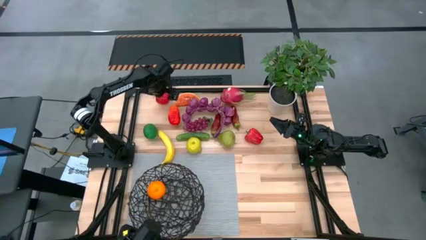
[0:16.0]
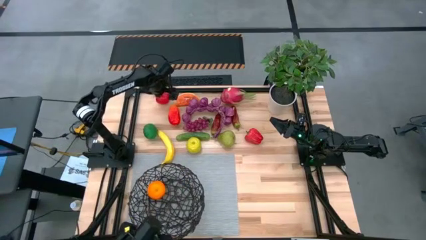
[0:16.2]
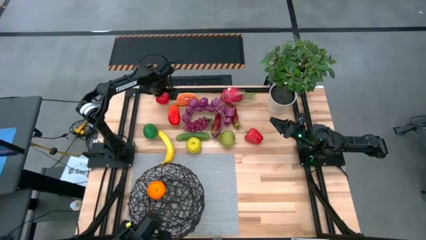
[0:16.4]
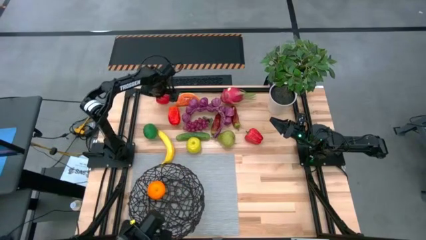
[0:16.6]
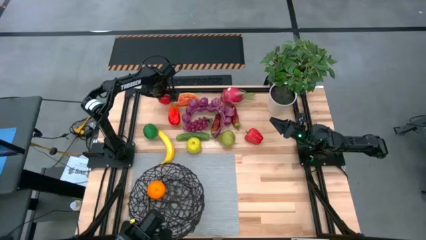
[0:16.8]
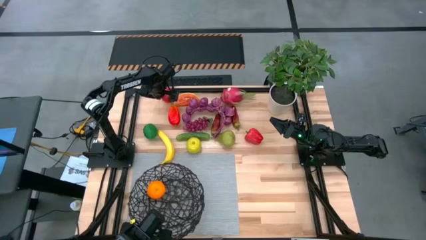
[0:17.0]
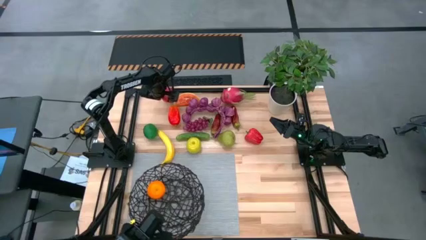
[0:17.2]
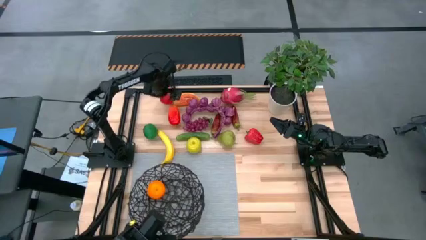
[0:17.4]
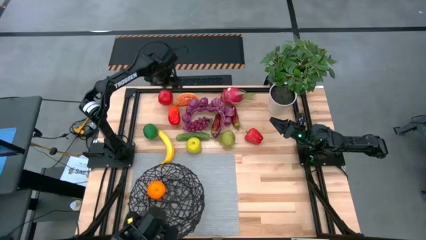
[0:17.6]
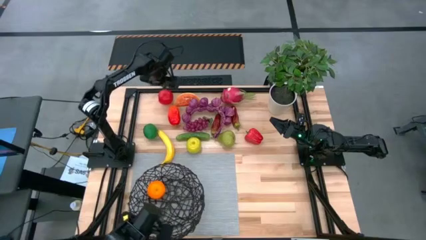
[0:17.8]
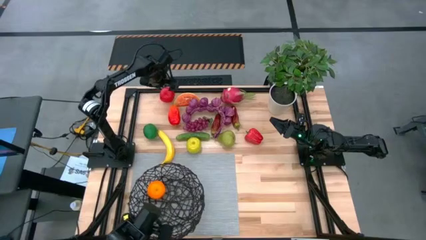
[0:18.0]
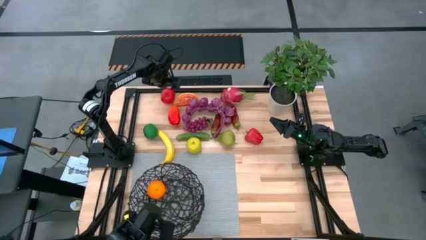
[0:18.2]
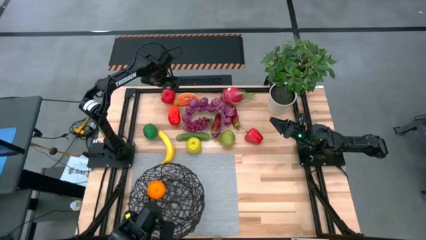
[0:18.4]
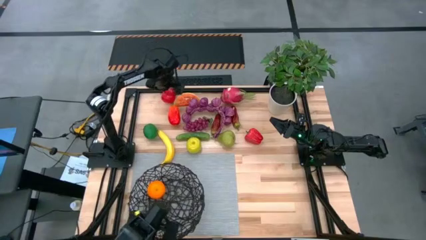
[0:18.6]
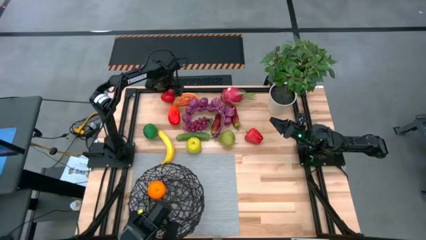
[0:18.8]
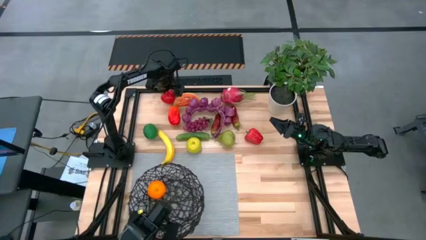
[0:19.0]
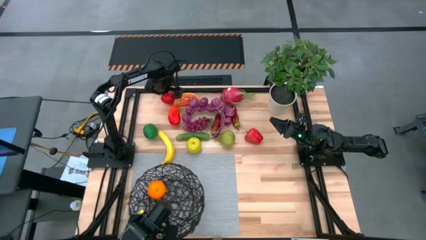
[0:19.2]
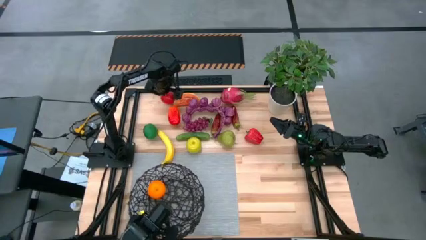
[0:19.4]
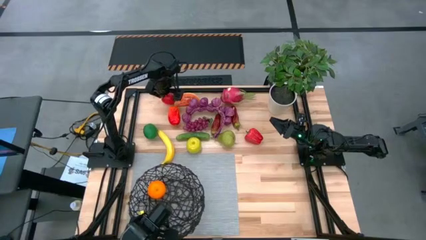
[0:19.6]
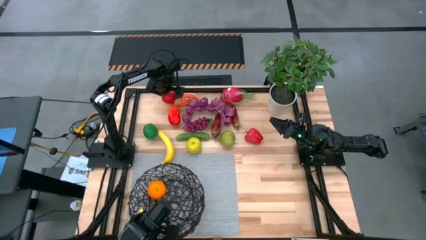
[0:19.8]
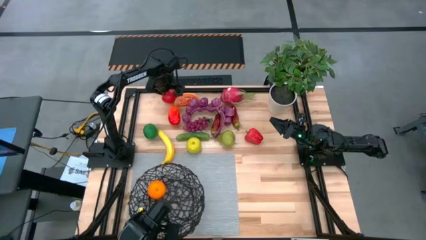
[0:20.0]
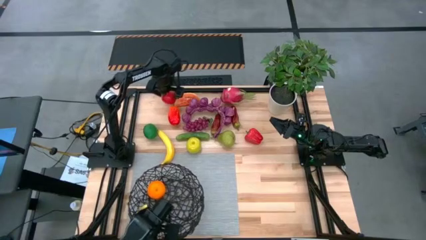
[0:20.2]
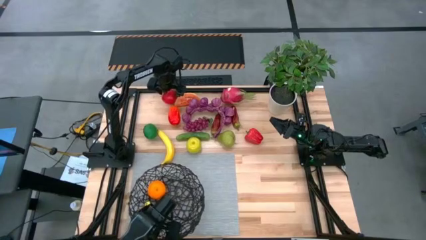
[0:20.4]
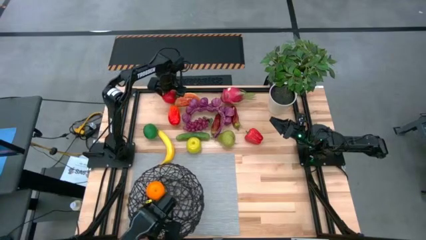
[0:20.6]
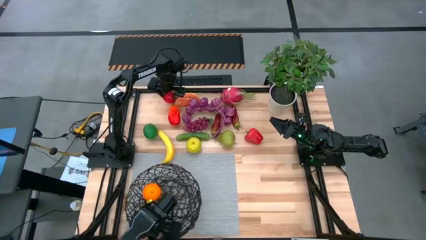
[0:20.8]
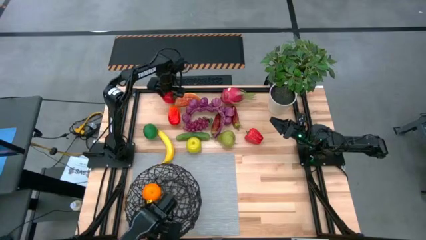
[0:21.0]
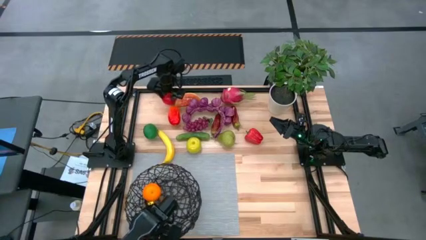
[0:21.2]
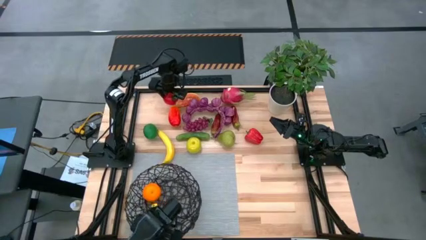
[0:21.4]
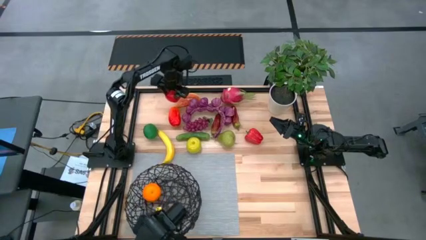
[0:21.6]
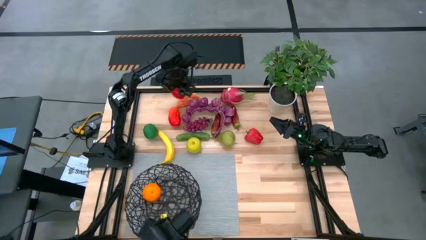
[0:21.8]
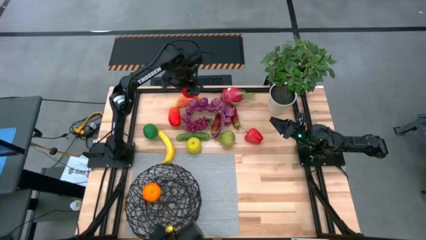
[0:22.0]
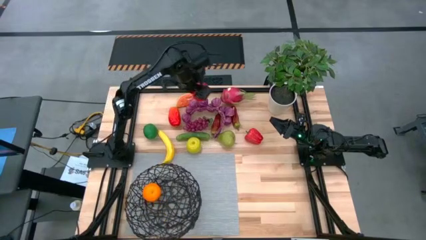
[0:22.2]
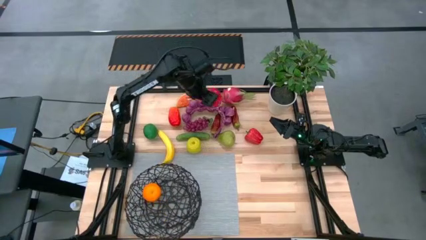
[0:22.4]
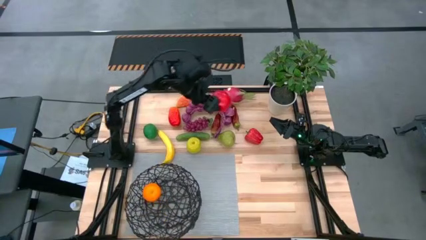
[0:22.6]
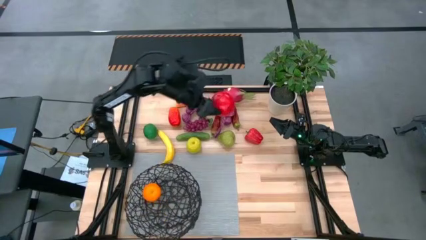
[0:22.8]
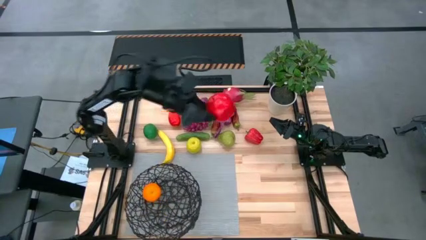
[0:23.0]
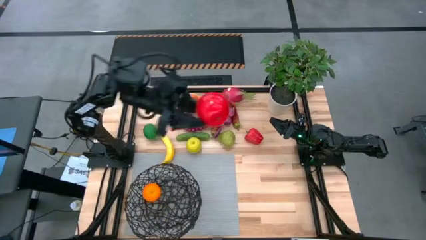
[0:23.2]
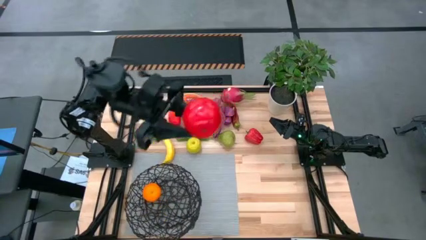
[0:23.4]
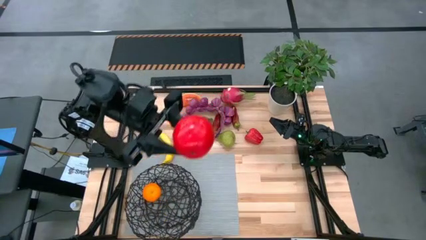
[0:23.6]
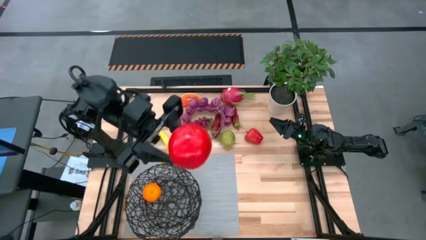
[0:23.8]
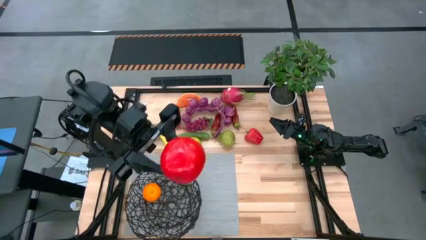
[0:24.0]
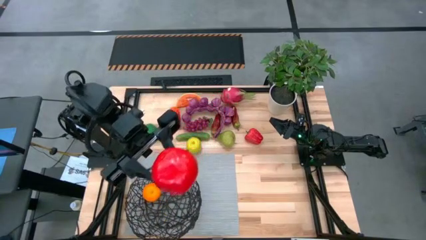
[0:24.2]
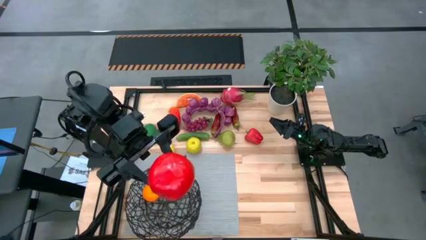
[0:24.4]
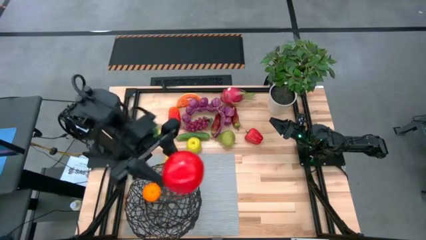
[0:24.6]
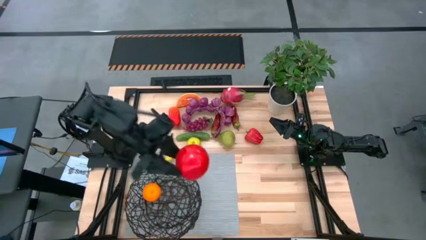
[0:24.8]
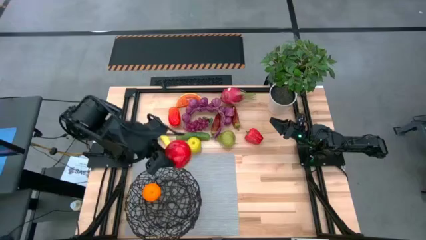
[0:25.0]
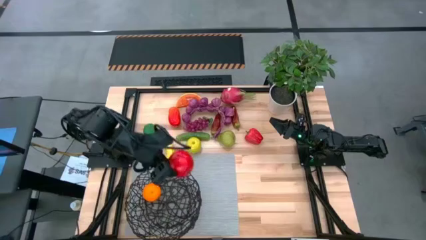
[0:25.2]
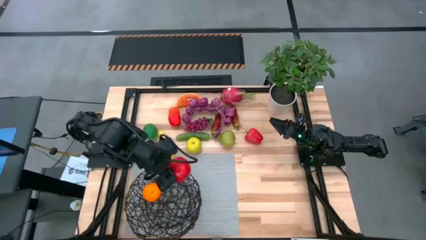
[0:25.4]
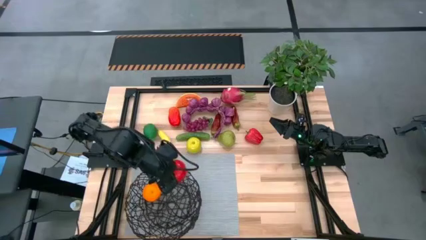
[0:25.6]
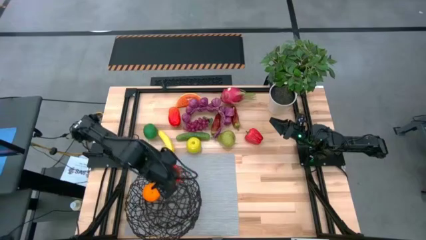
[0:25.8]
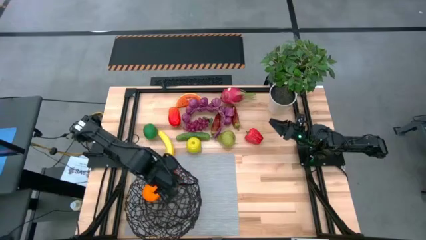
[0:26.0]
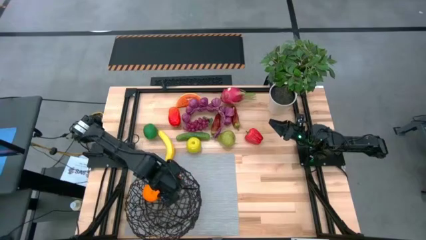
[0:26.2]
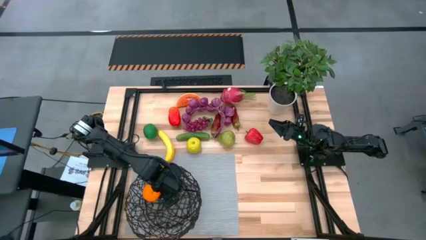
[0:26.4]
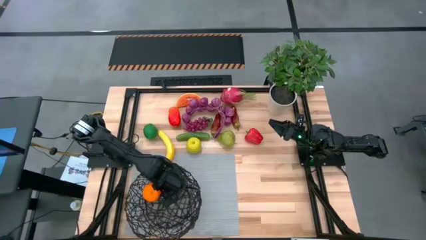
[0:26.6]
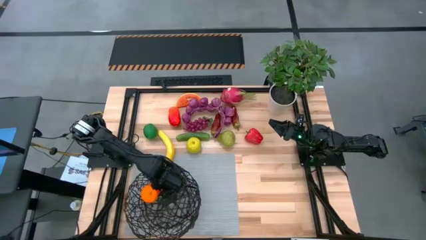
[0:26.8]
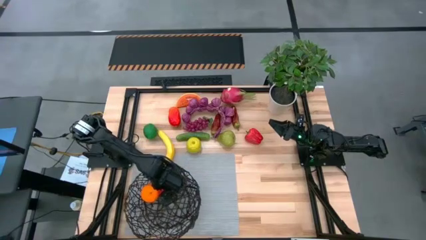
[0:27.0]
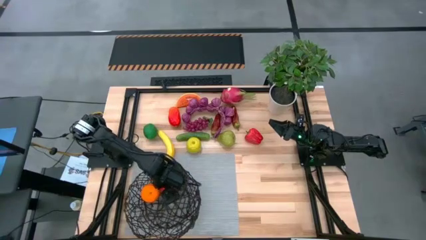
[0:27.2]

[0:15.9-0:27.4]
Task: Build produce basket
Put the red apple into the black wire basket

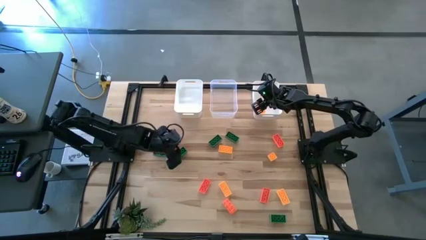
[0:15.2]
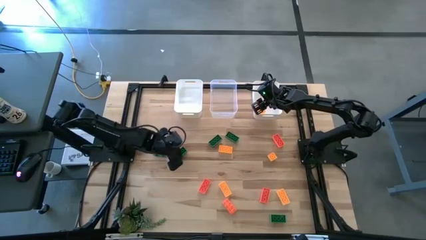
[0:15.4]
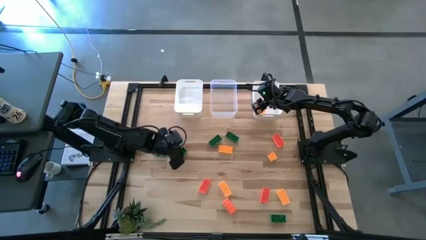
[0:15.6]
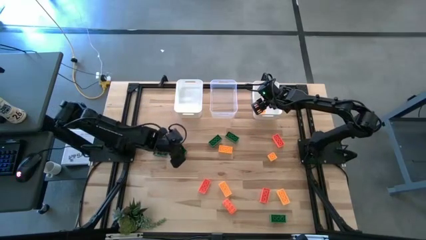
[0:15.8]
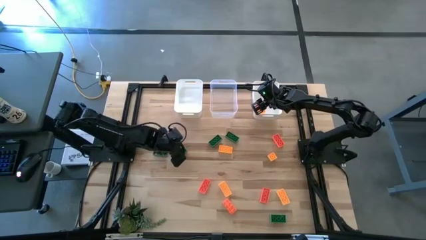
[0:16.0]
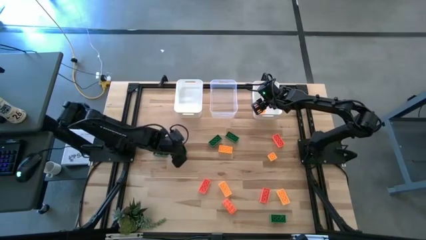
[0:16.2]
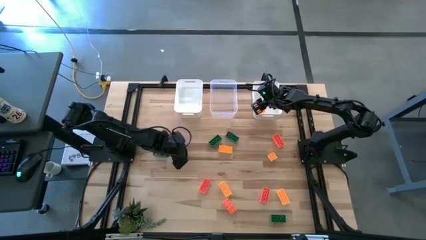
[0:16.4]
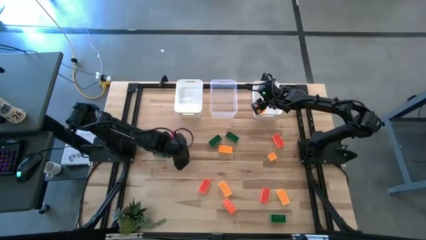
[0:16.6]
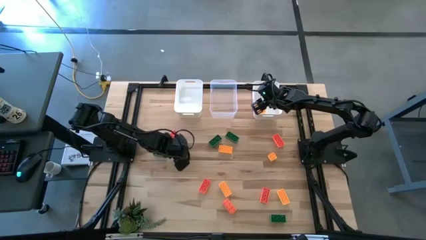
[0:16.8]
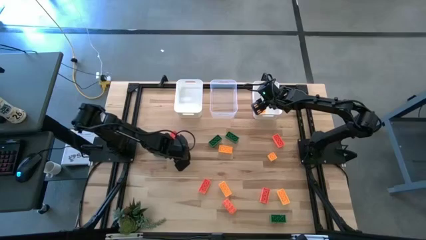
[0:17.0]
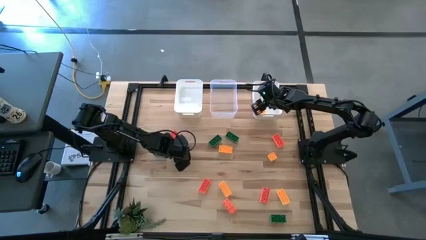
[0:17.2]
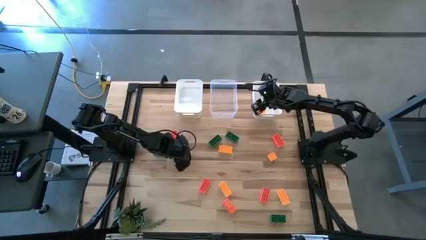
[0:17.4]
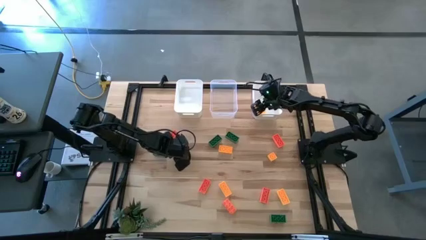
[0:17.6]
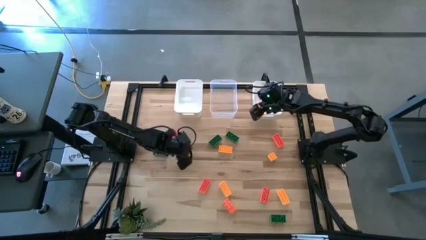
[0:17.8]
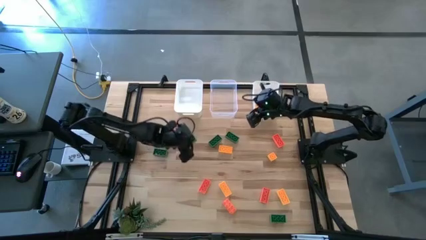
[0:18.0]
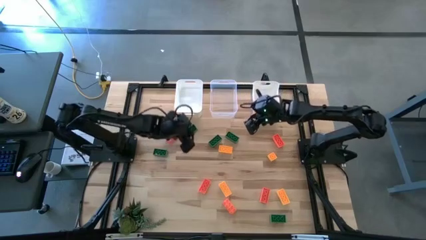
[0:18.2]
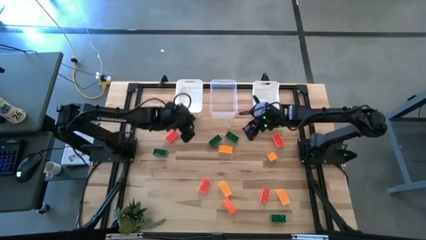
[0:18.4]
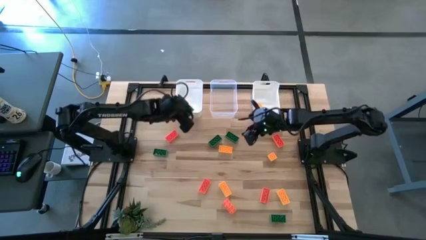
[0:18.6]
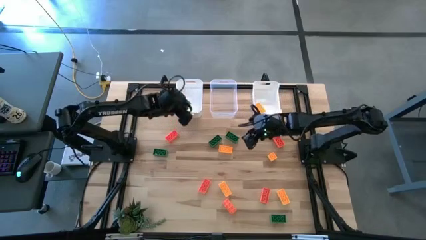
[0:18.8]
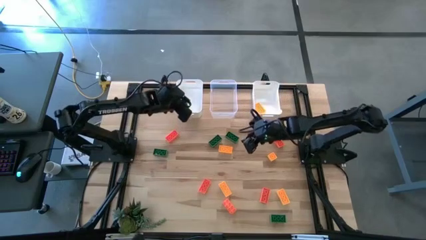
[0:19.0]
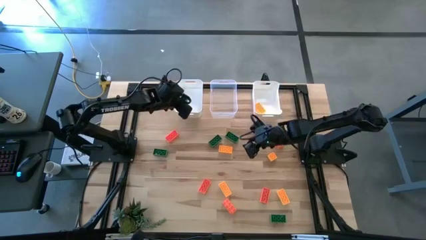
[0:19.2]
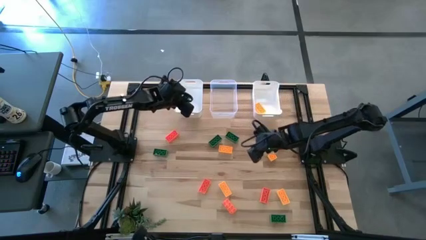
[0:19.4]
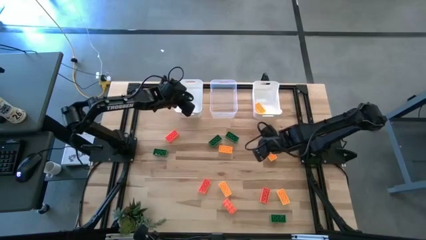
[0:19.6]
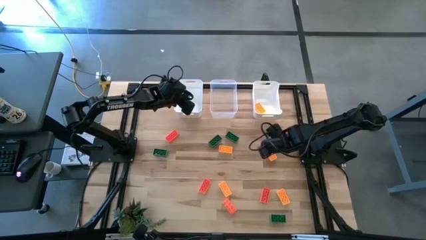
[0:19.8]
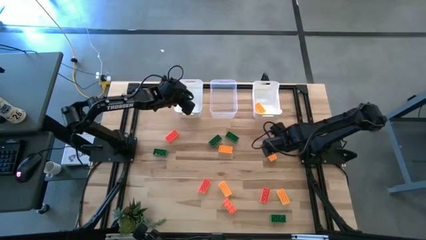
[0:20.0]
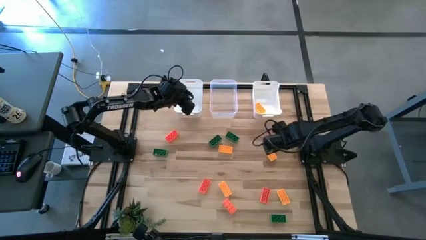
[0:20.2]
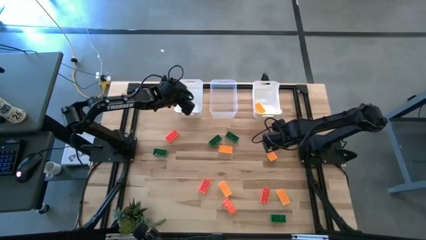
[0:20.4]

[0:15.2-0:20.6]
Task: Sort & place blocks by color
Put the green game piece into the left white bin
